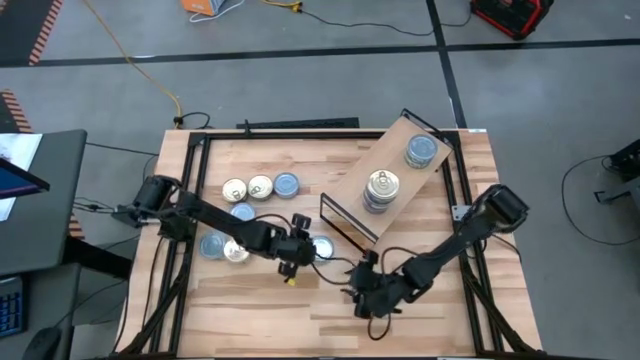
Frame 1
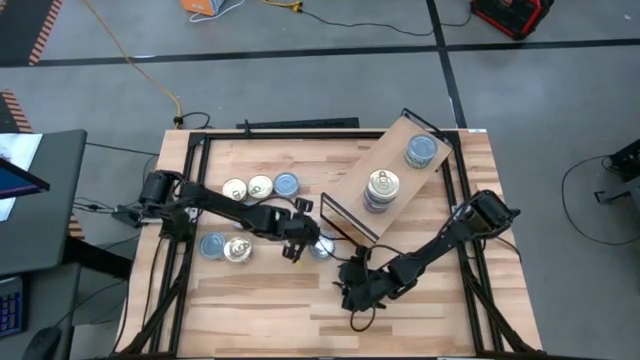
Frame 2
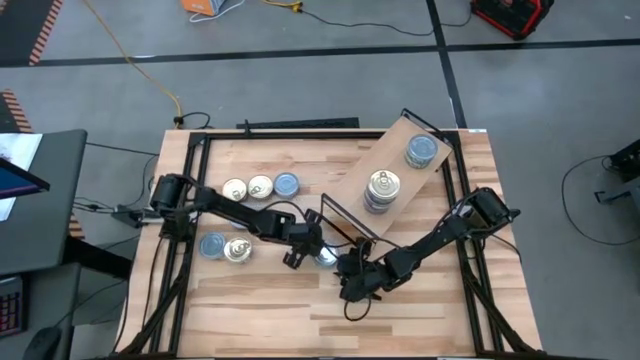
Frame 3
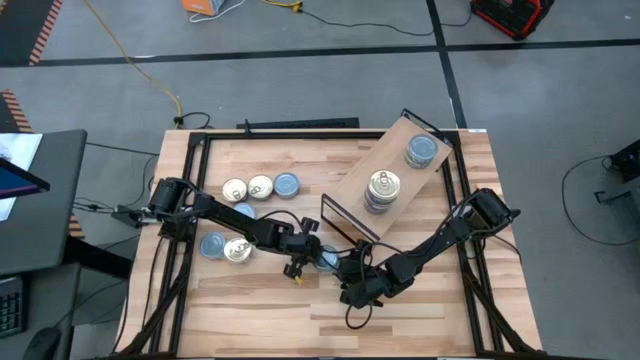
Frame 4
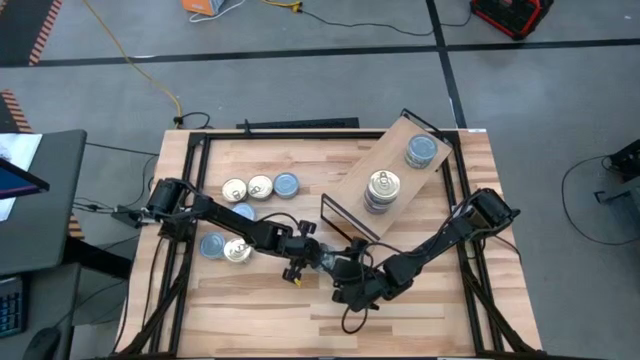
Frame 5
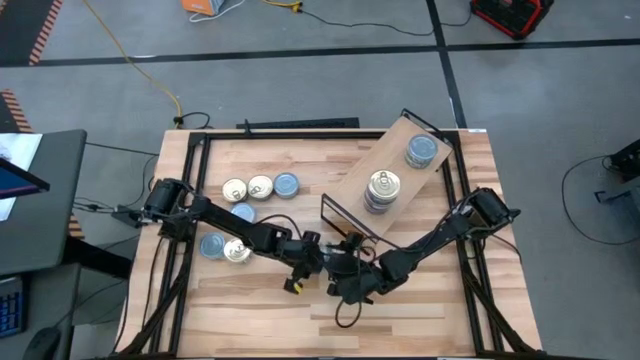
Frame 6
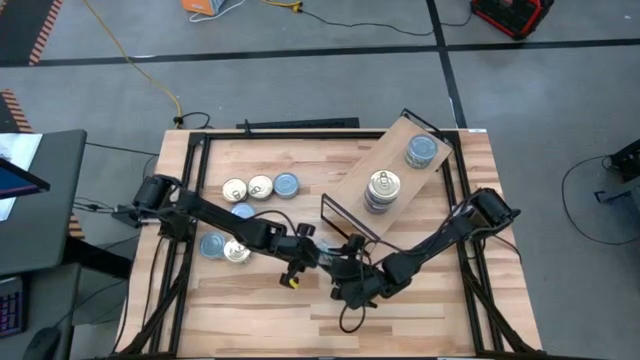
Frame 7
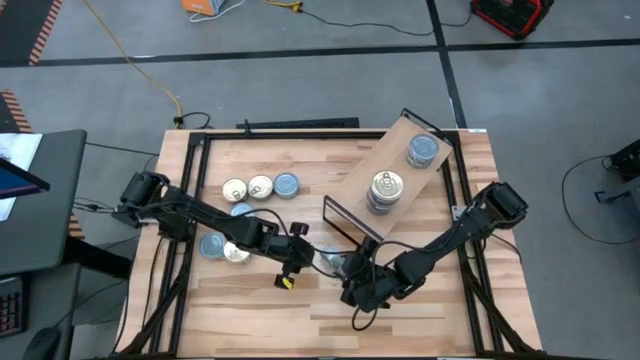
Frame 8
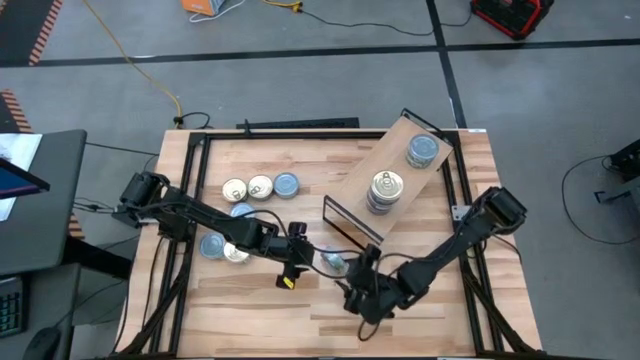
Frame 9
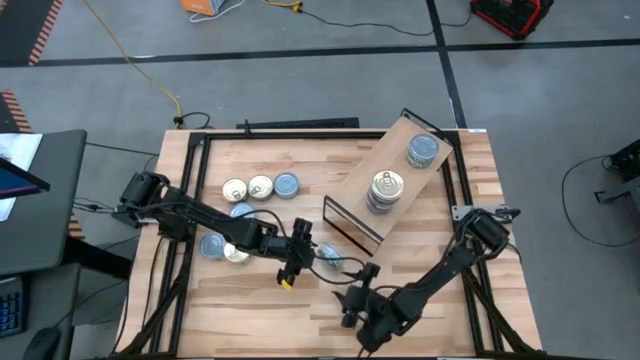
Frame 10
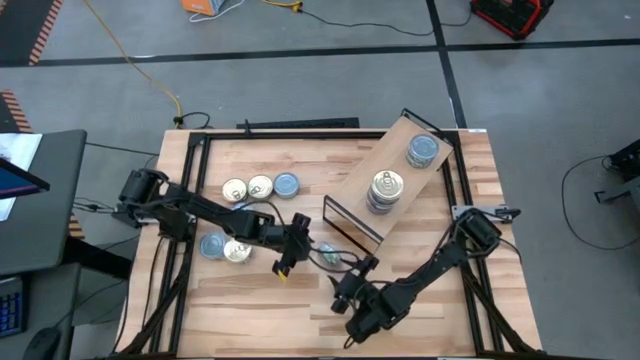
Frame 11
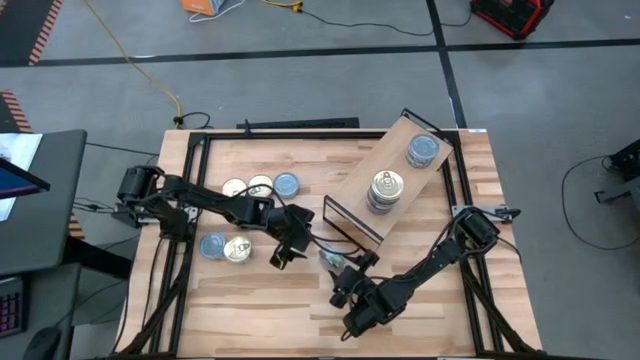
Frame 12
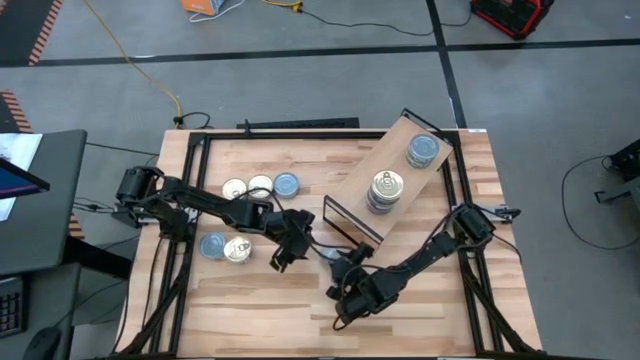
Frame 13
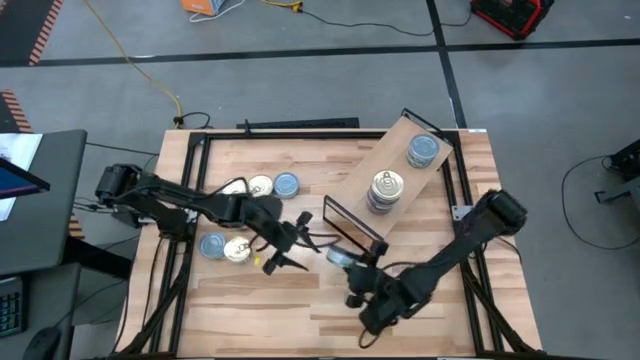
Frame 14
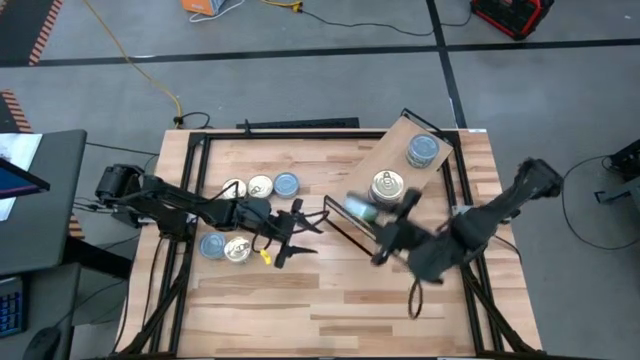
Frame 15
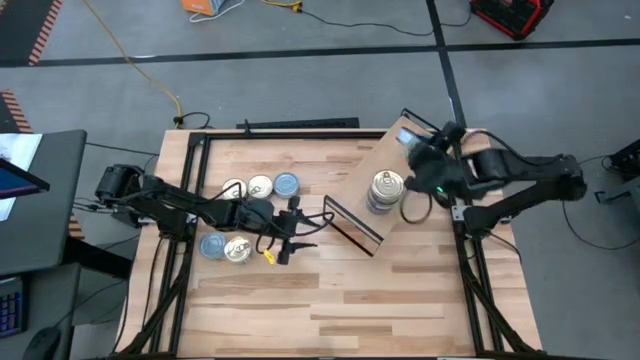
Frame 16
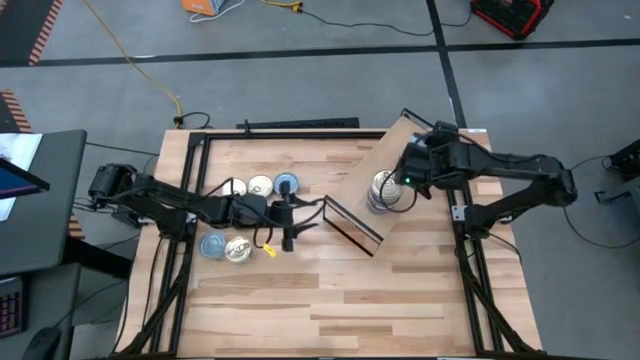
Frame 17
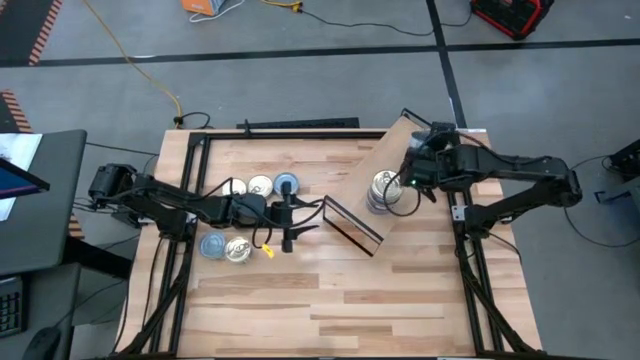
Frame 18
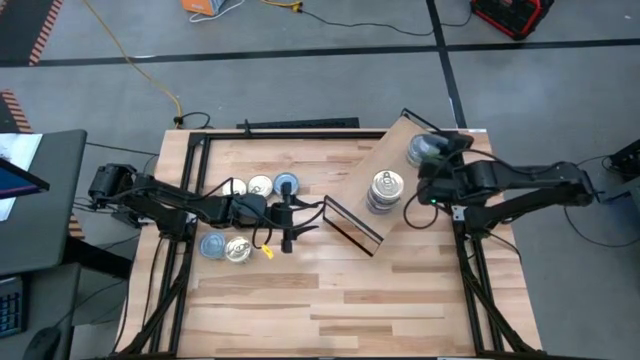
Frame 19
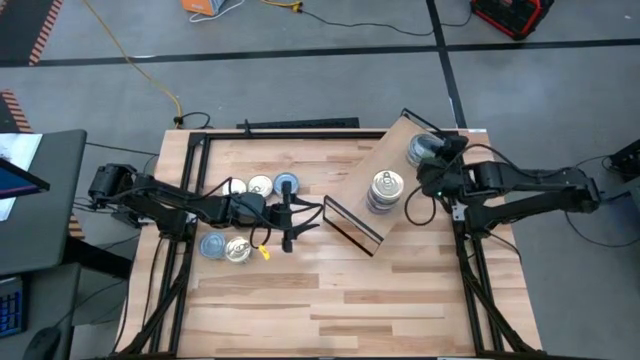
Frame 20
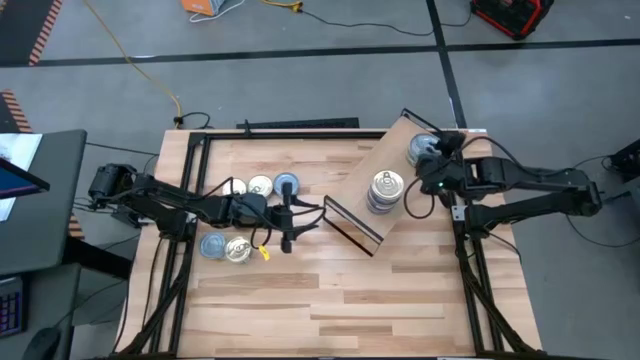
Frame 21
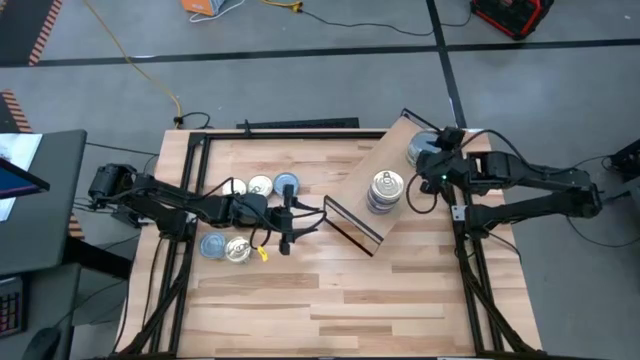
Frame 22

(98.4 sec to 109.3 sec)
Task: Stack canned seafood by type on shelf
Stack the green tuna can on the shelf

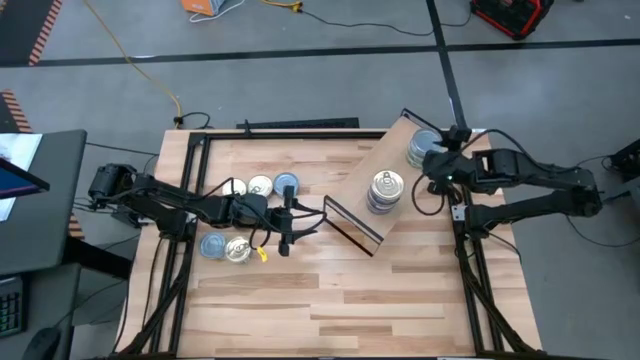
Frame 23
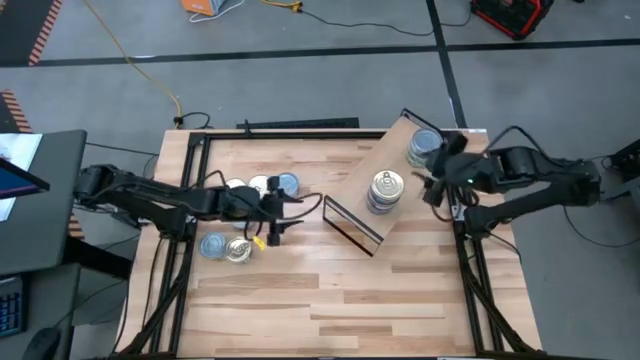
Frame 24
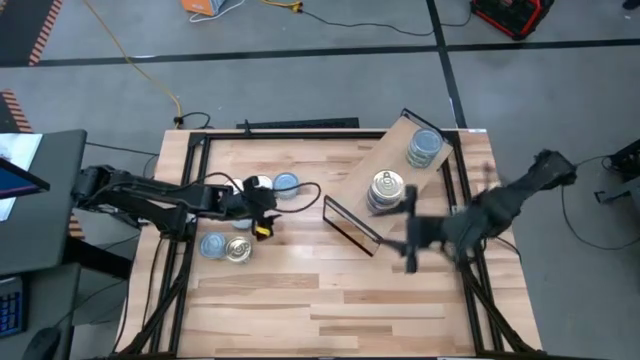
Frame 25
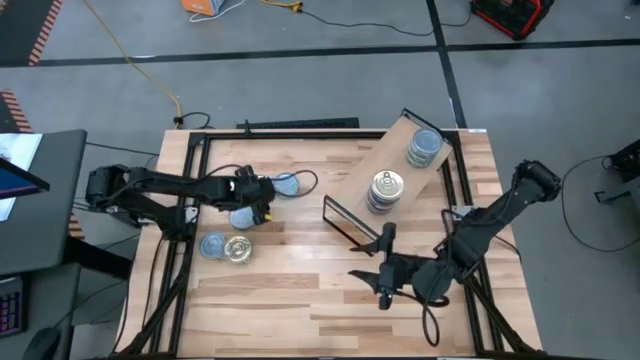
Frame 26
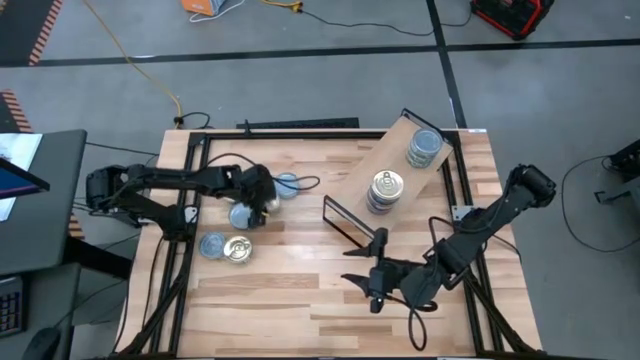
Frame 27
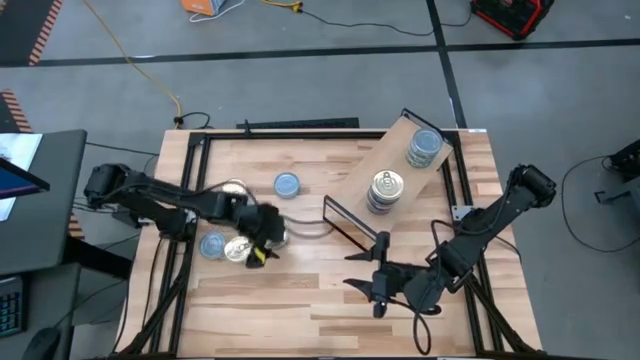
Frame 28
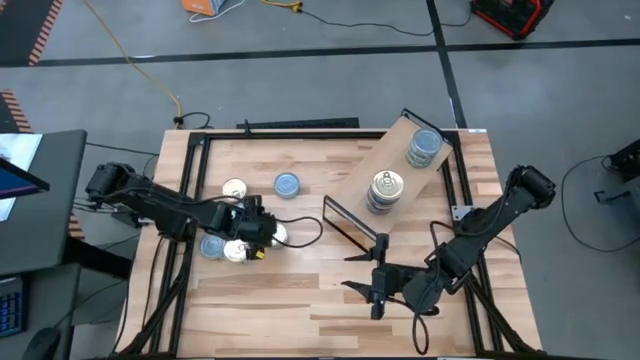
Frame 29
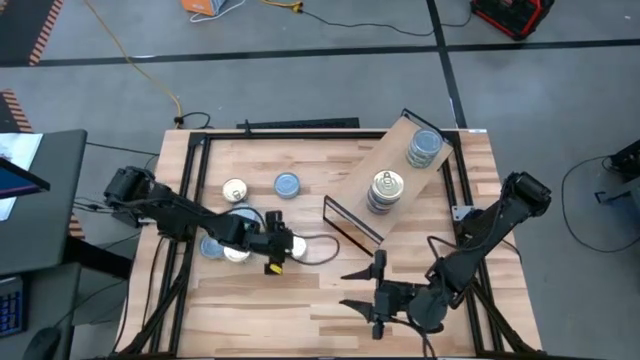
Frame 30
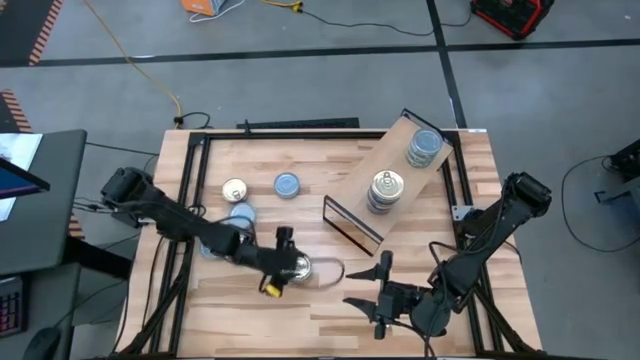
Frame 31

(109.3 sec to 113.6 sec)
Move the blue and pink tuna can to the center of the table

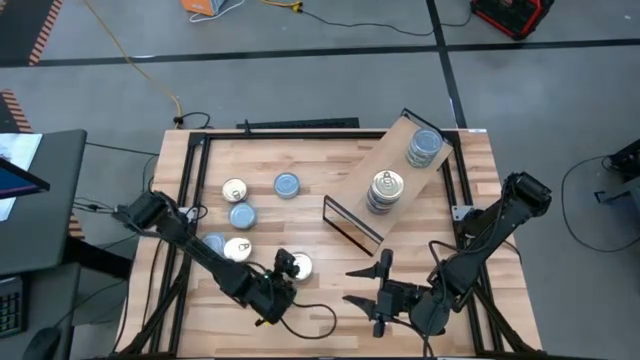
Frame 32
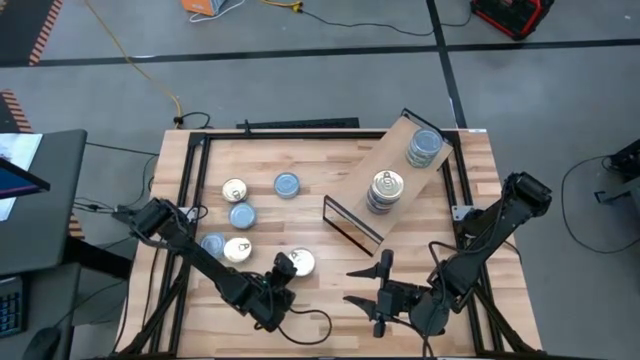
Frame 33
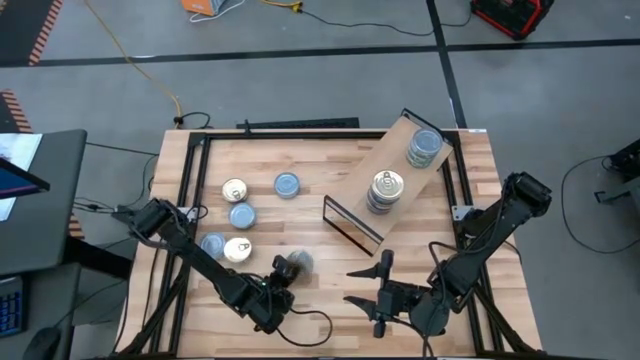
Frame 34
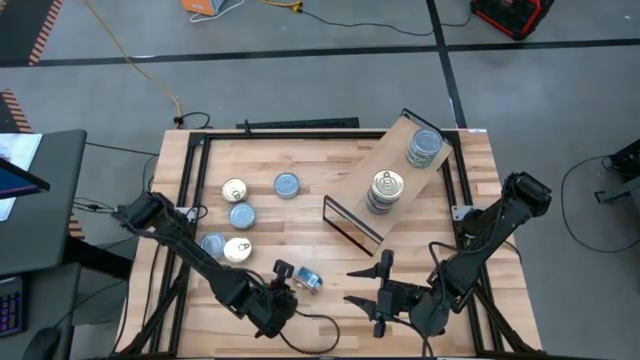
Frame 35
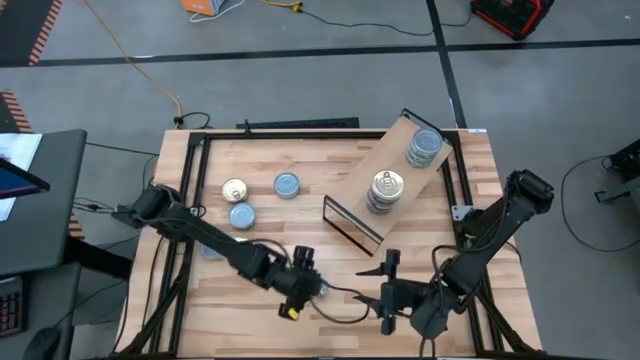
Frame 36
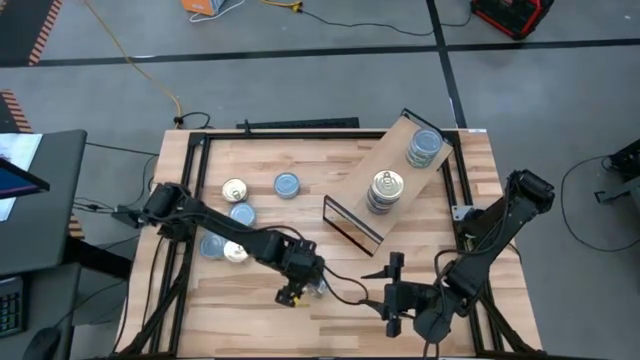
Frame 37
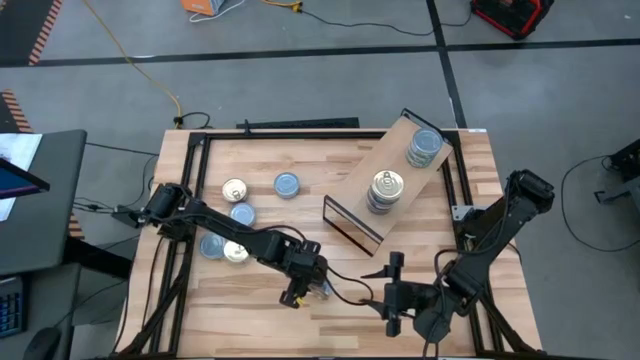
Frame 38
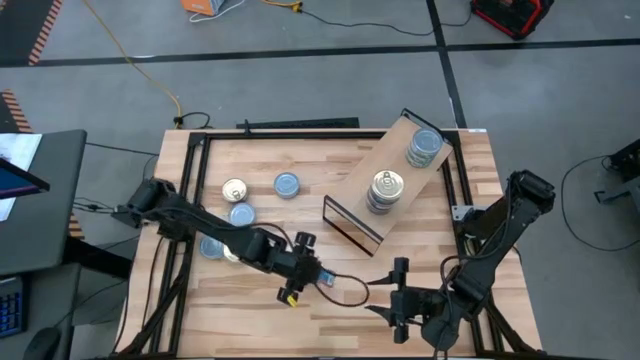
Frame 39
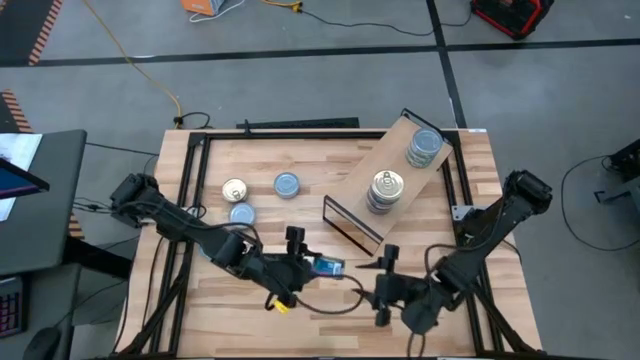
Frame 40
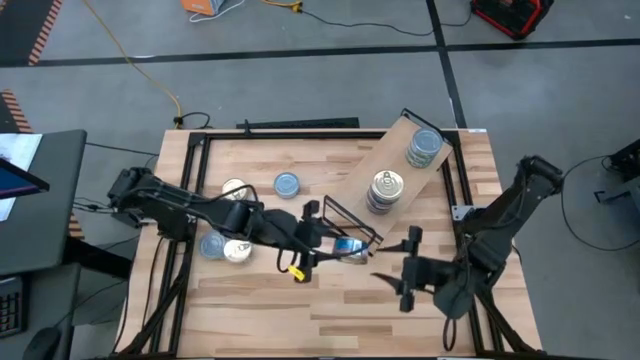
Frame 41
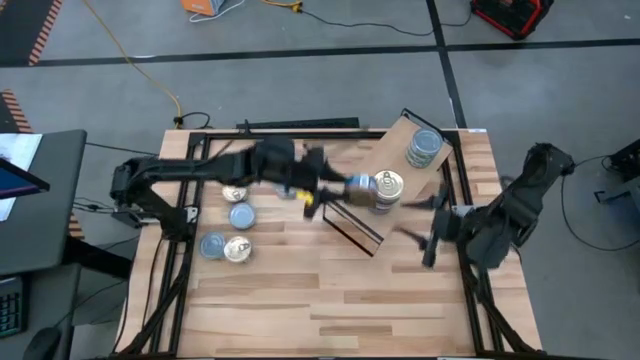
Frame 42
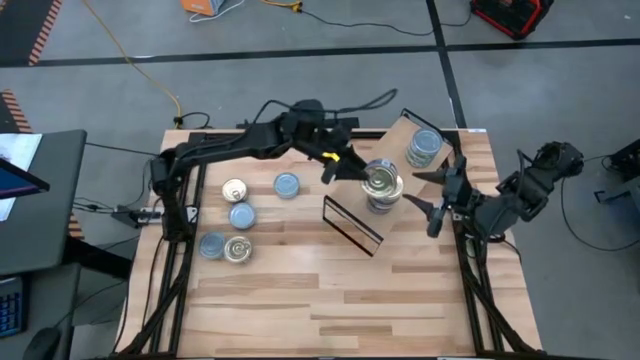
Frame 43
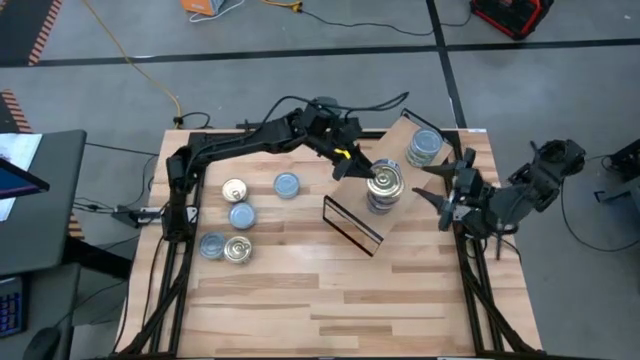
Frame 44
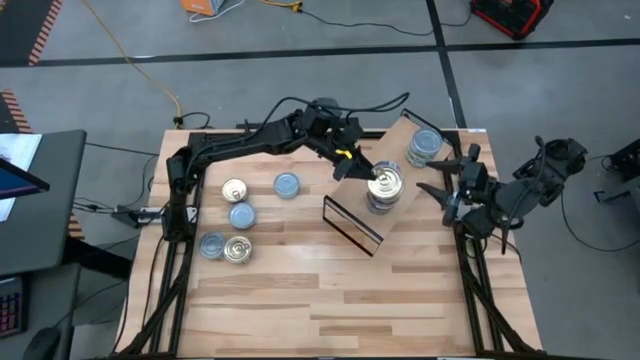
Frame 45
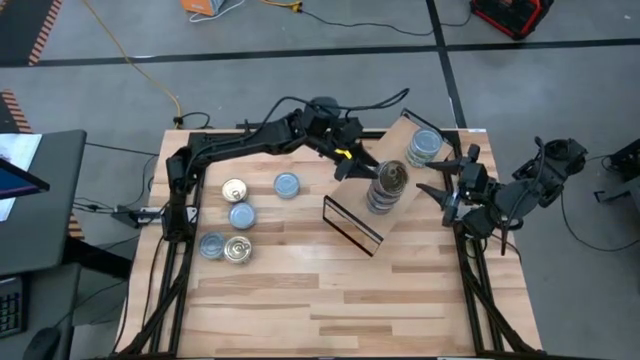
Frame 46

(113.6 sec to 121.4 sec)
Stack the blue and pink tuna can on the shelf
